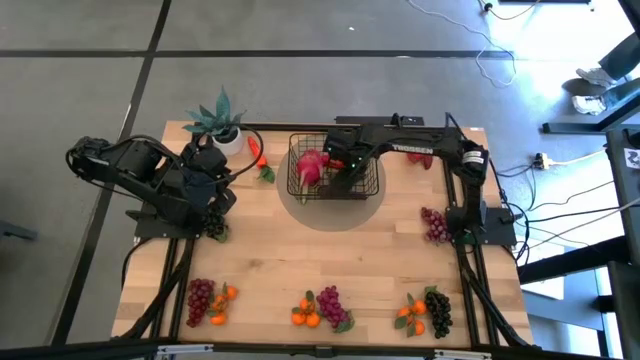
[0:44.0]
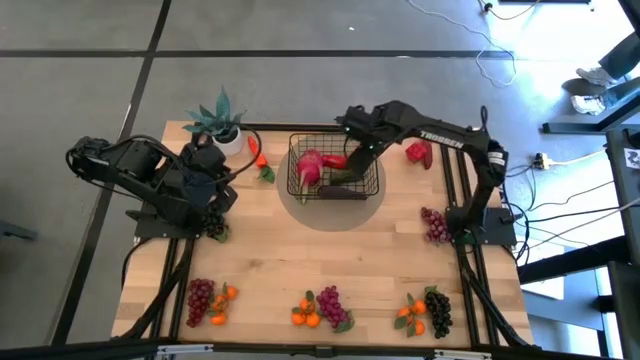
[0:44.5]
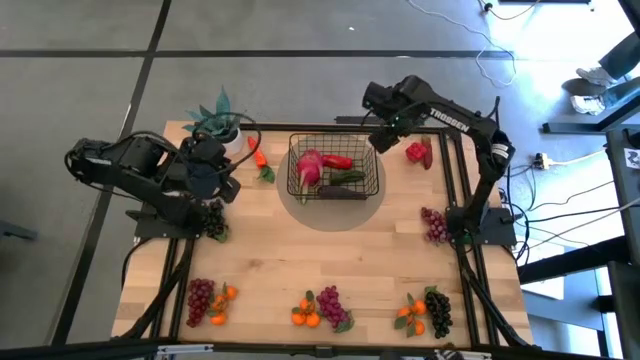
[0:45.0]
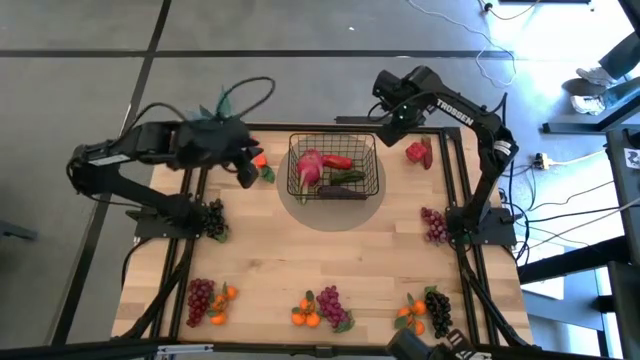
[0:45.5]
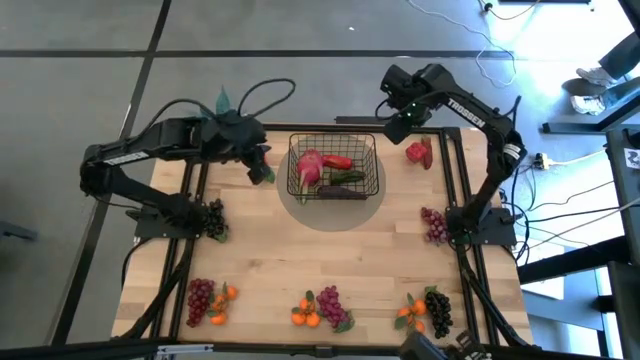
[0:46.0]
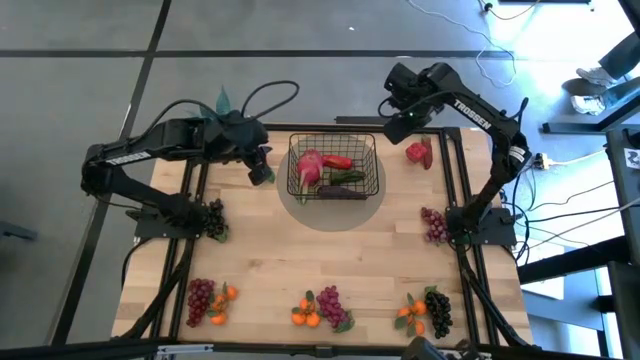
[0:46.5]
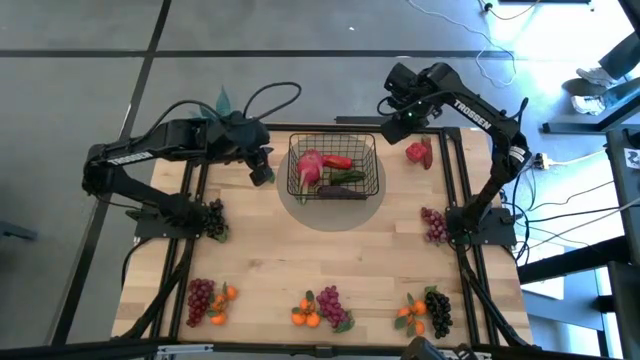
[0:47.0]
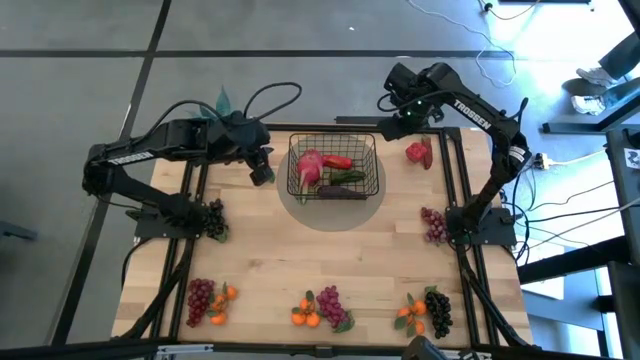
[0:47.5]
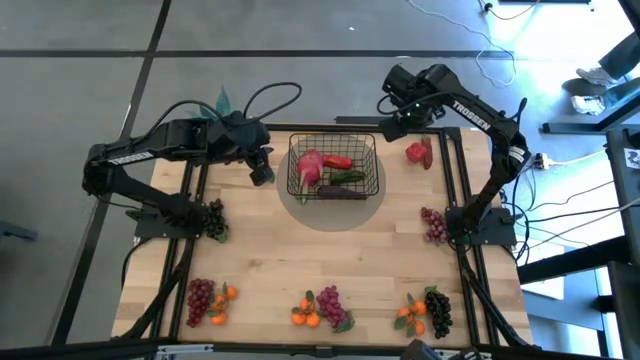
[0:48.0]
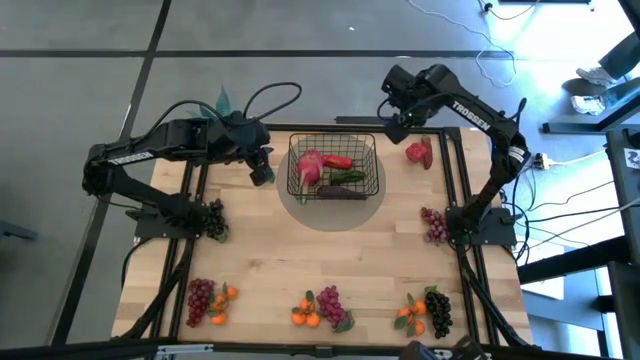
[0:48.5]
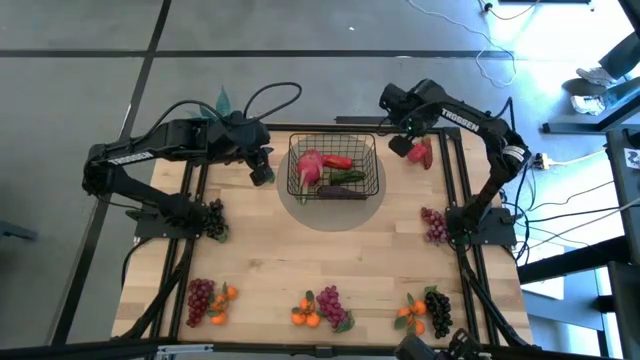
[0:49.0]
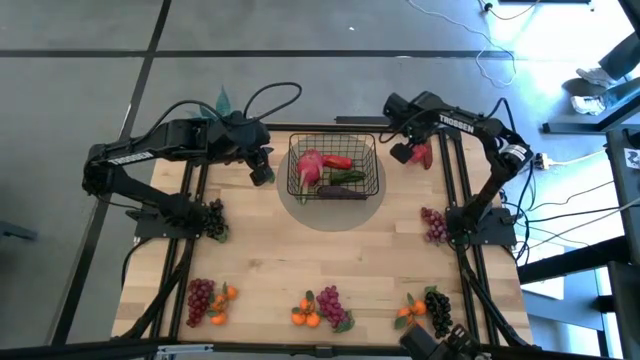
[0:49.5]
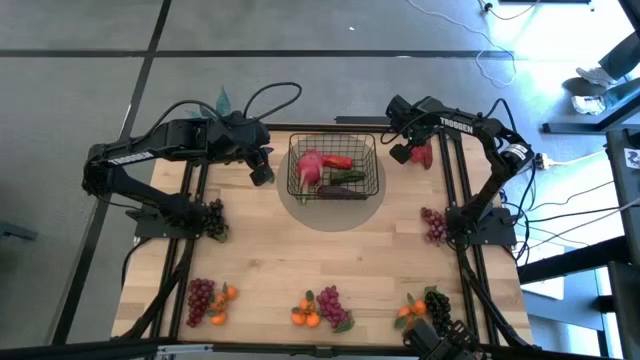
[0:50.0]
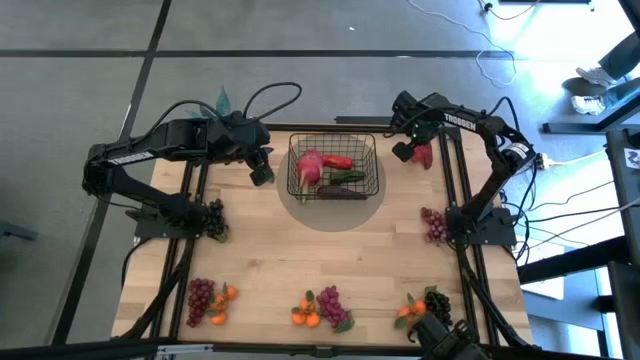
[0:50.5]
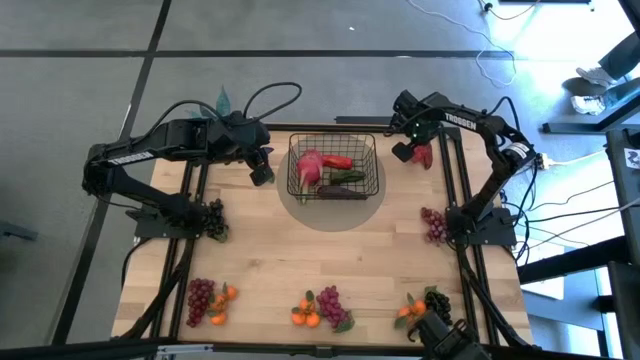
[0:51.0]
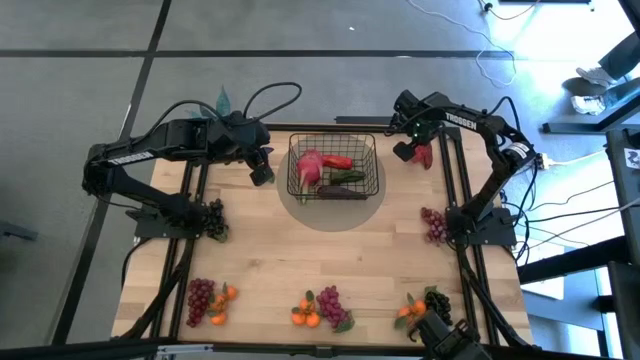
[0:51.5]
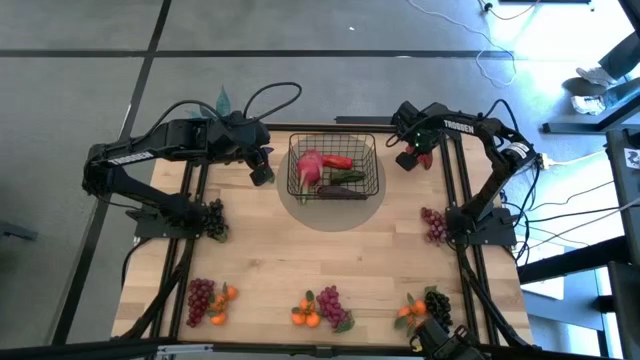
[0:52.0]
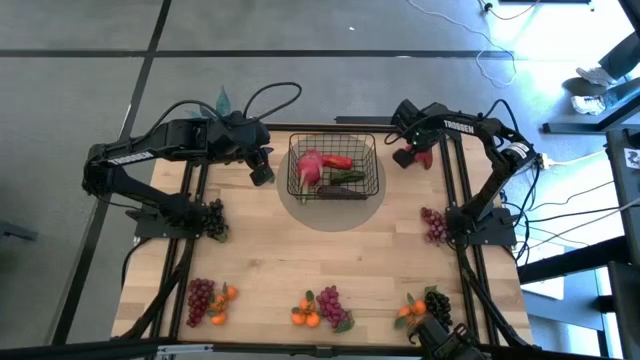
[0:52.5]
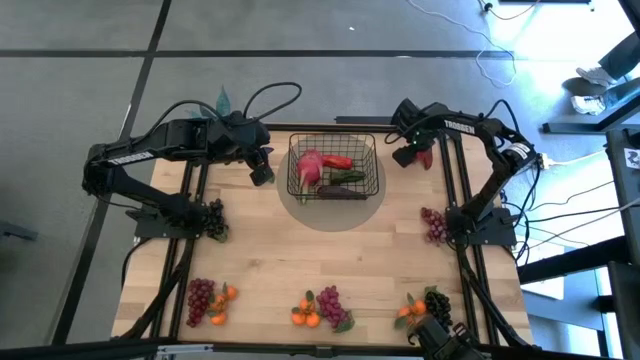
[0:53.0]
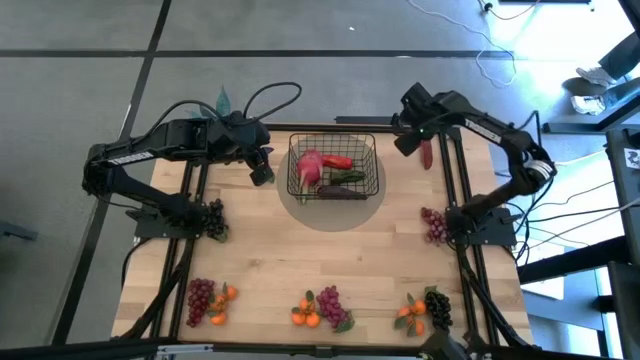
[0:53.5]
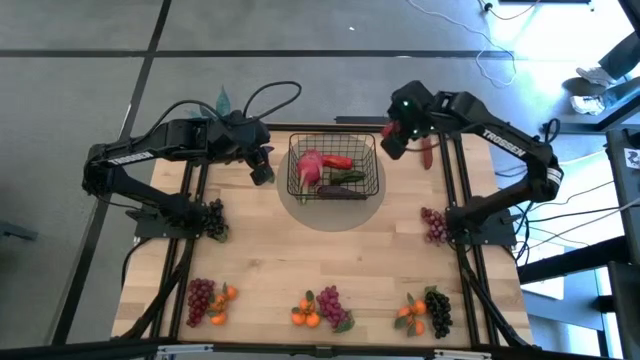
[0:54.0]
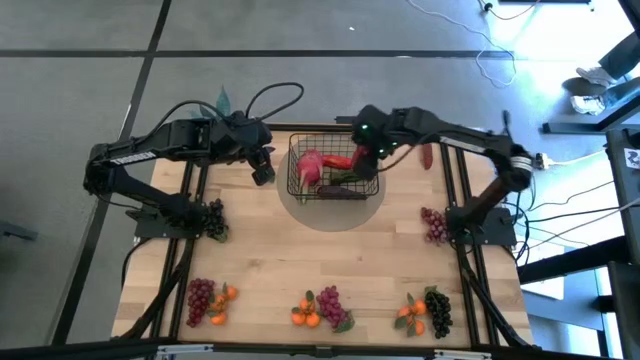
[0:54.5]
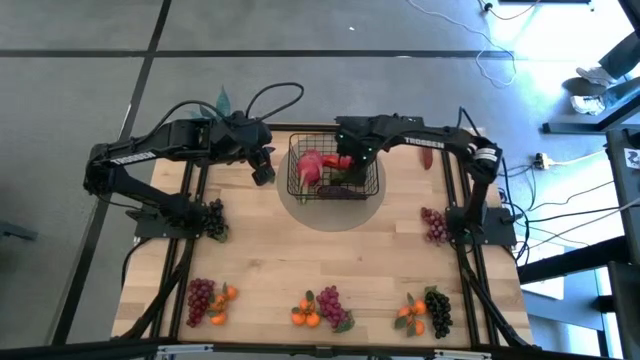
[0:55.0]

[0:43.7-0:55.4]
Task: Build produce basket
Put the red bell pepper into the black wire basket

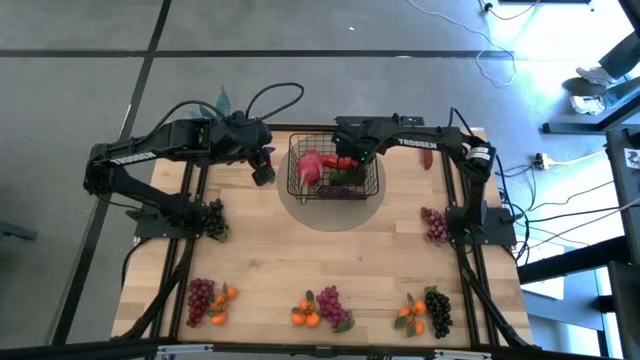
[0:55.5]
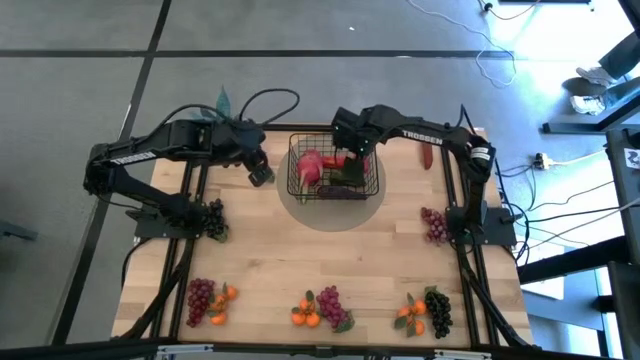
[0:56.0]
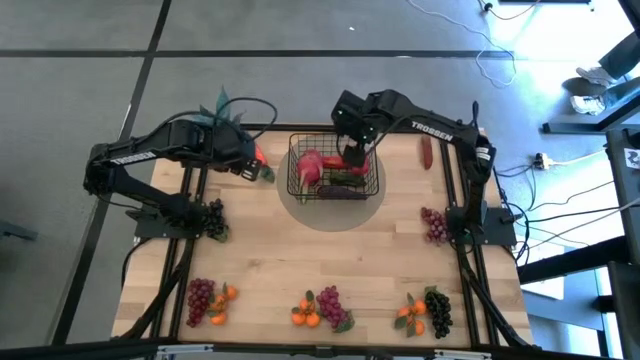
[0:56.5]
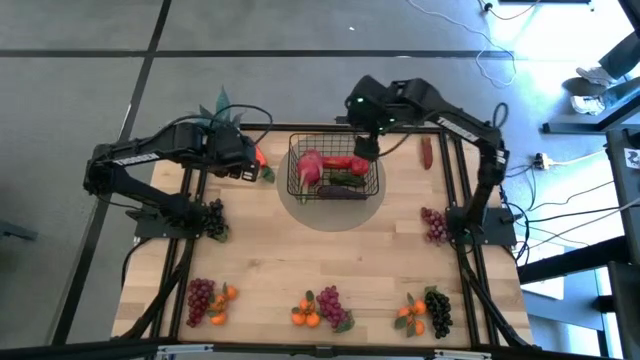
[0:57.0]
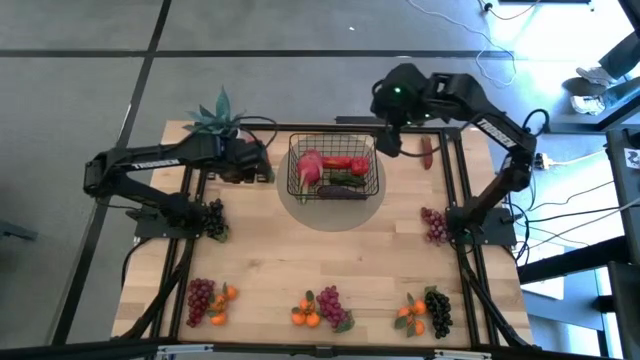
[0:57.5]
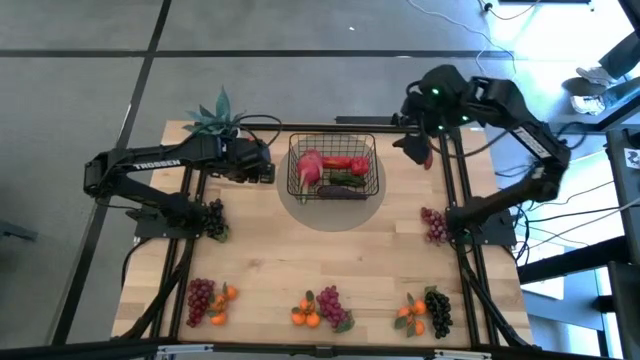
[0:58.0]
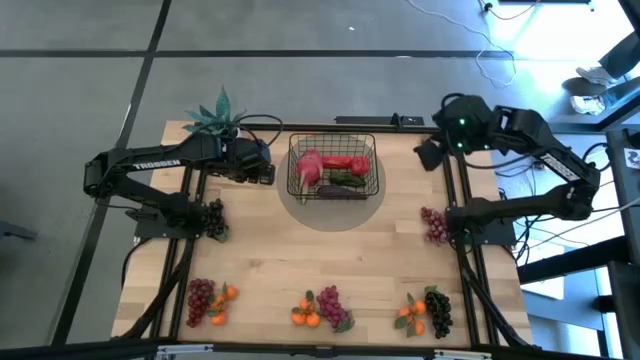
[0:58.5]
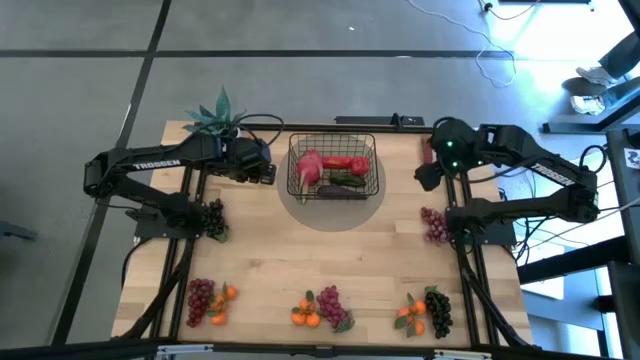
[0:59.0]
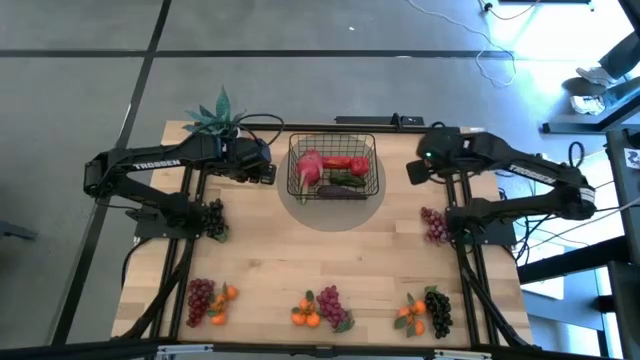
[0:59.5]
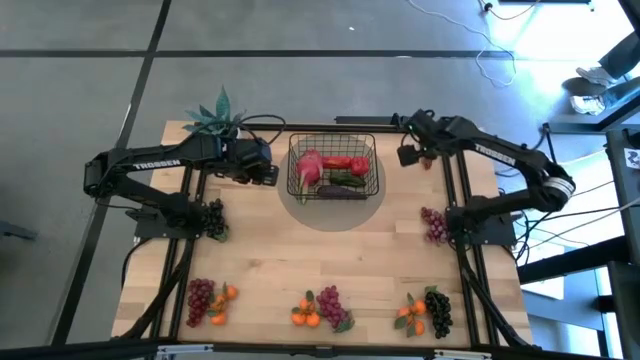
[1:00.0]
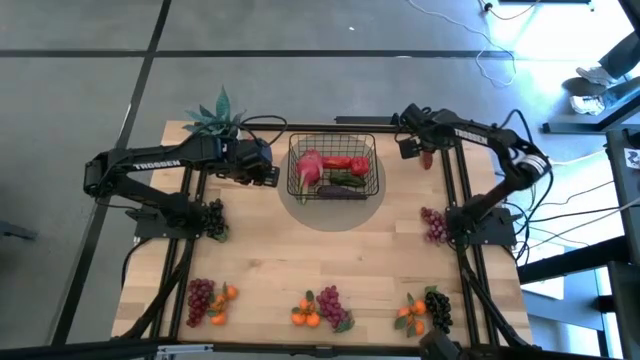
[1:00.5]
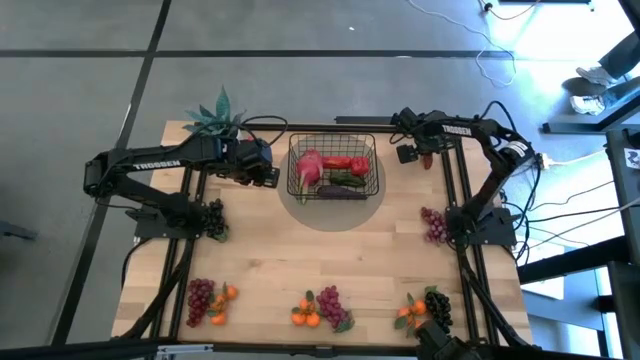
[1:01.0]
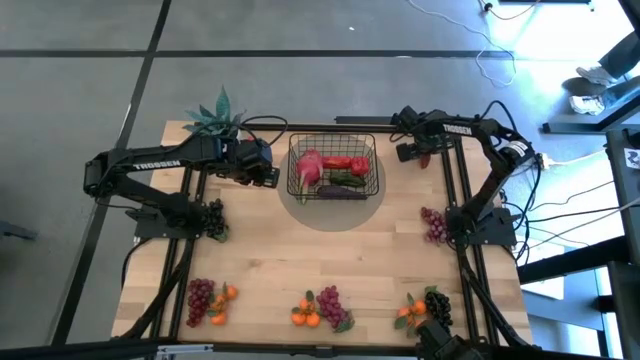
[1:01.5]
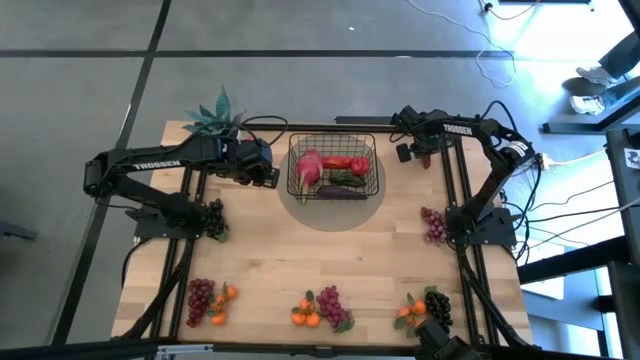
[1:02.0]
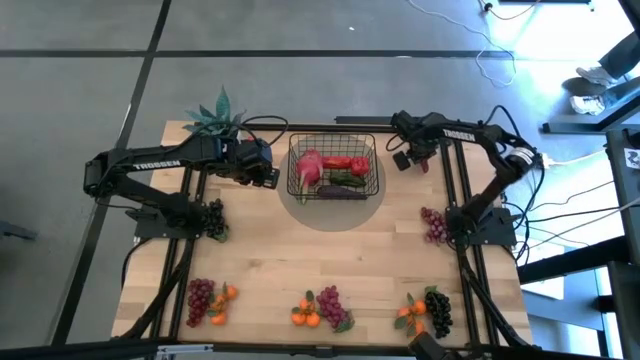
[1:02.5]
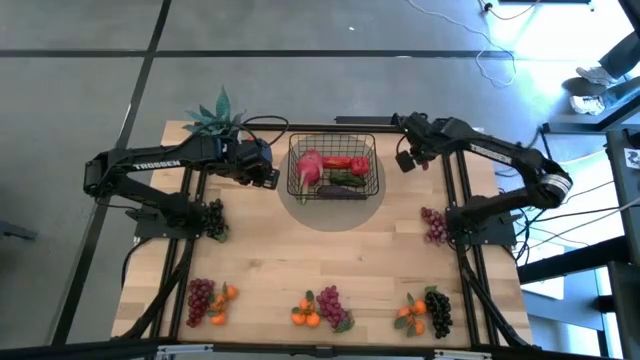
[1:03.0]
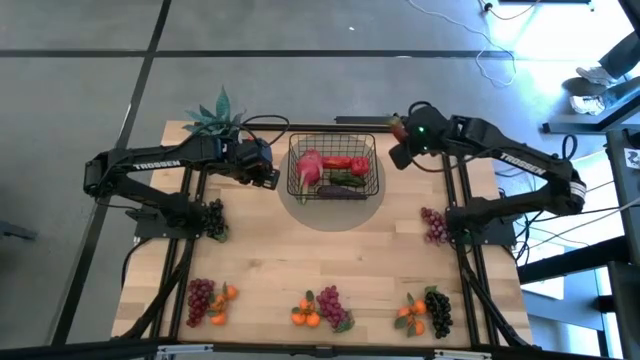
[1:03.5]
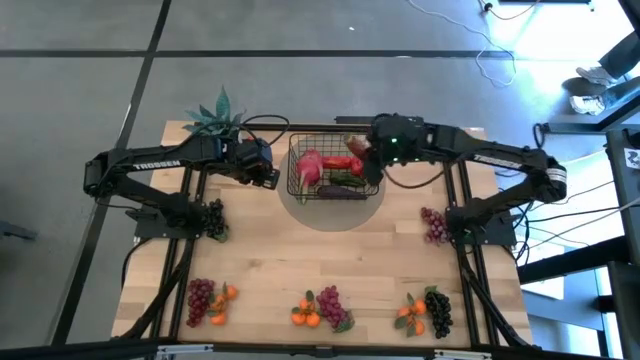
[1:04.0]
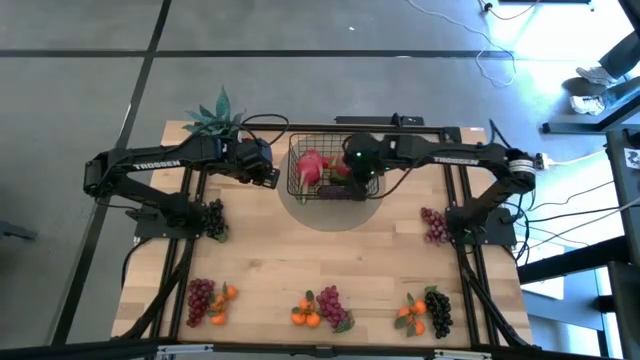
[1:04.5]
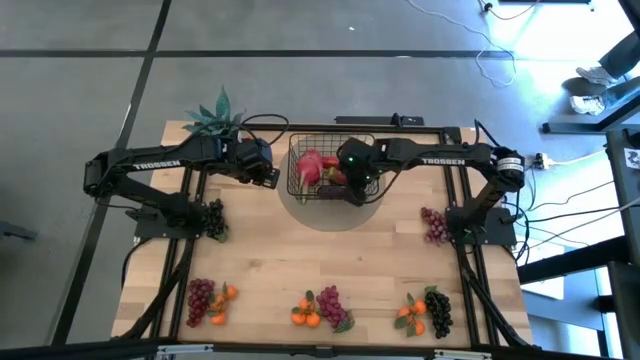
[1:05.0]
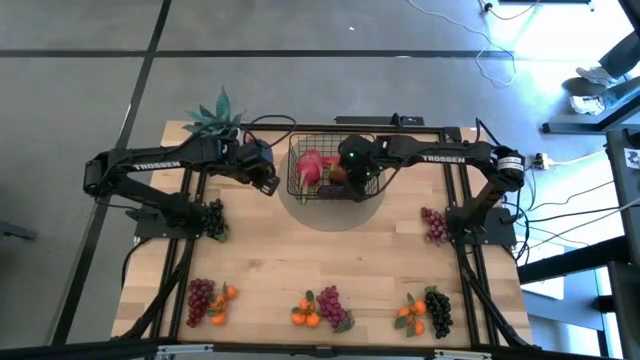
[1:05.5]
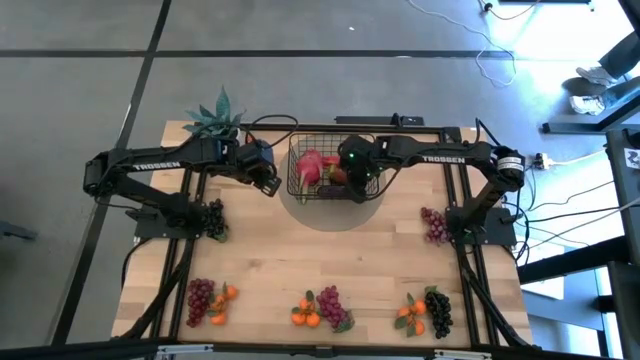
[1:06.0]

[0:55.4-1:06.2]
Put the dark red chili pepper into the black wire basket
